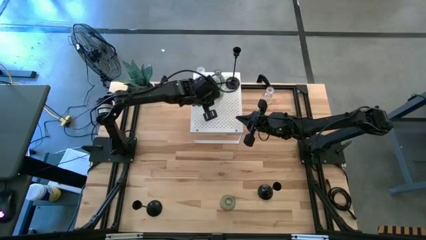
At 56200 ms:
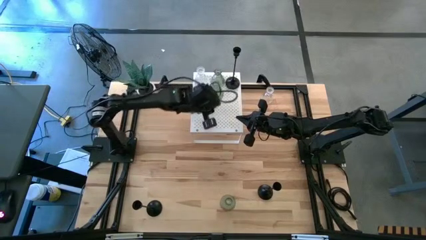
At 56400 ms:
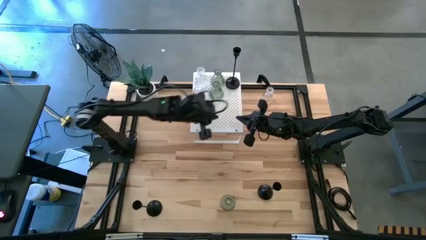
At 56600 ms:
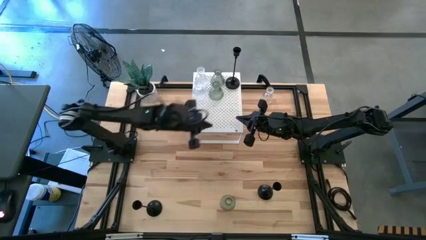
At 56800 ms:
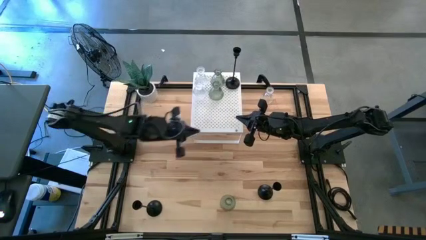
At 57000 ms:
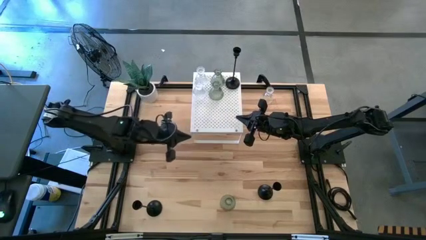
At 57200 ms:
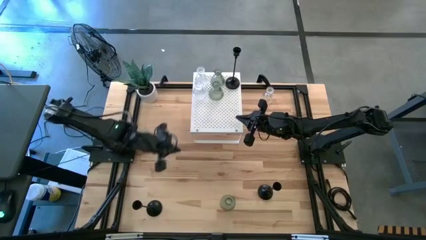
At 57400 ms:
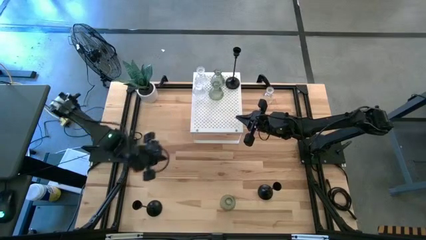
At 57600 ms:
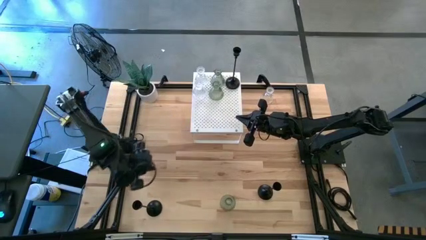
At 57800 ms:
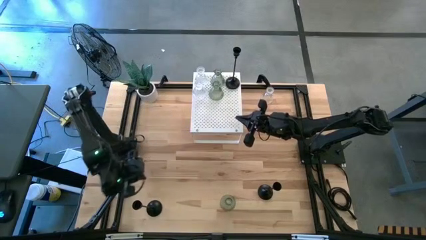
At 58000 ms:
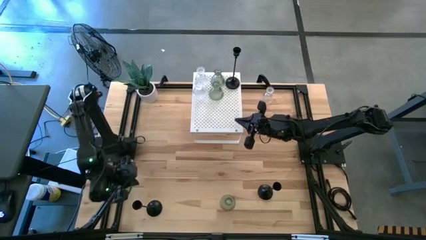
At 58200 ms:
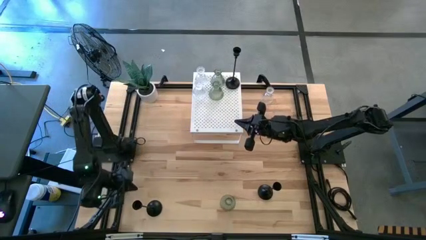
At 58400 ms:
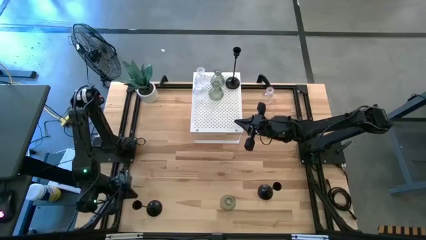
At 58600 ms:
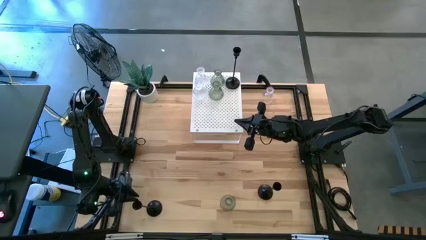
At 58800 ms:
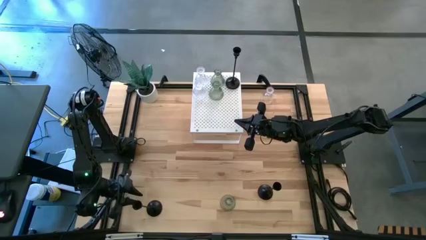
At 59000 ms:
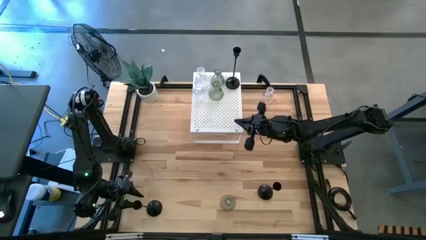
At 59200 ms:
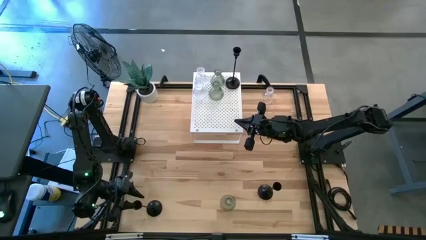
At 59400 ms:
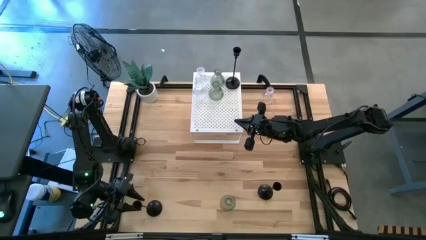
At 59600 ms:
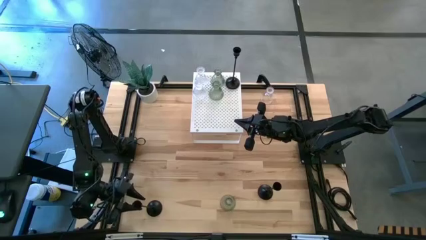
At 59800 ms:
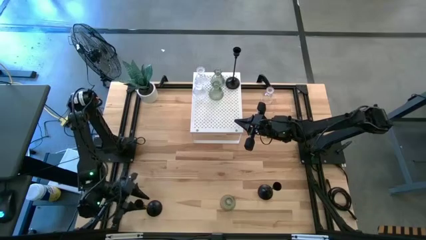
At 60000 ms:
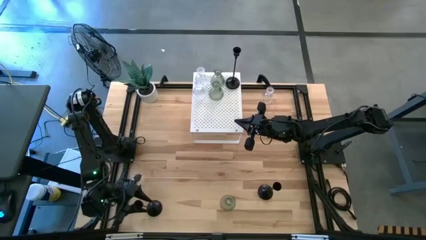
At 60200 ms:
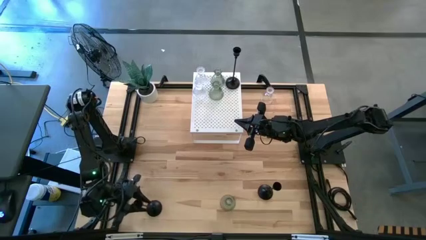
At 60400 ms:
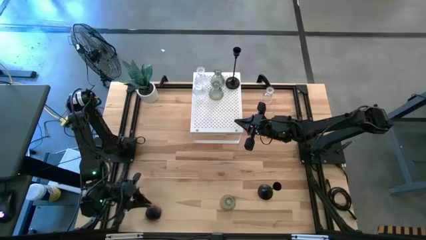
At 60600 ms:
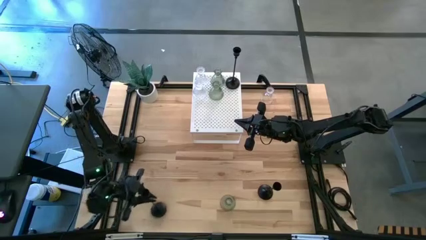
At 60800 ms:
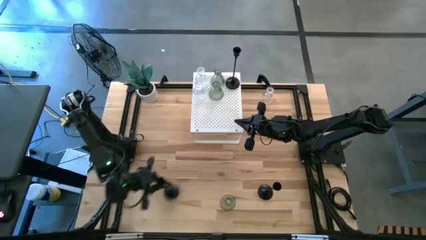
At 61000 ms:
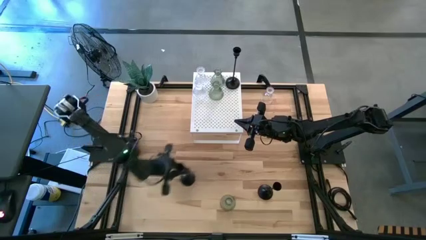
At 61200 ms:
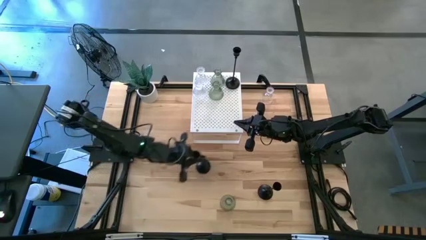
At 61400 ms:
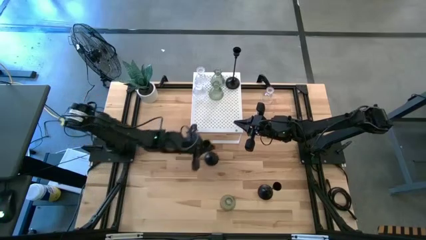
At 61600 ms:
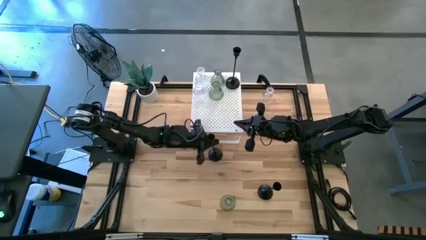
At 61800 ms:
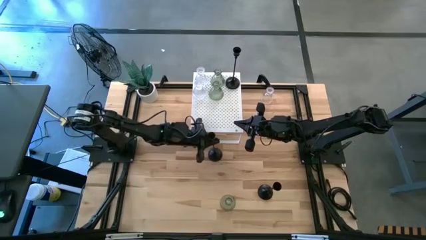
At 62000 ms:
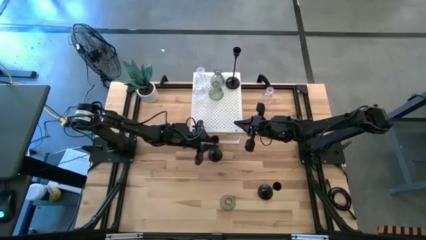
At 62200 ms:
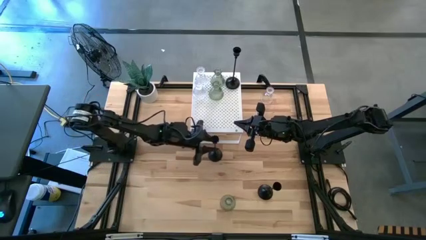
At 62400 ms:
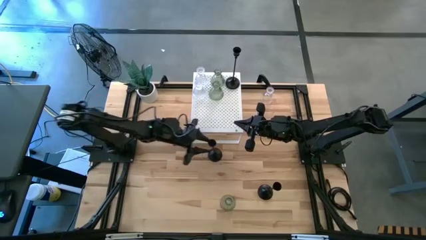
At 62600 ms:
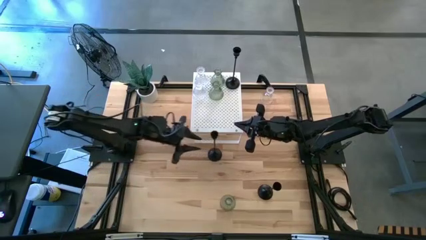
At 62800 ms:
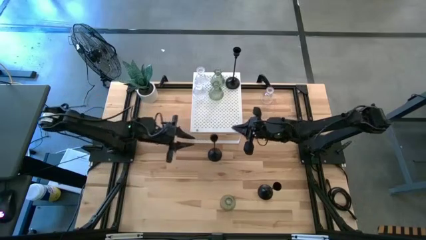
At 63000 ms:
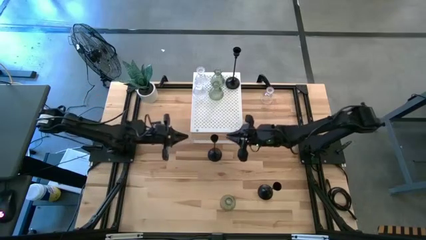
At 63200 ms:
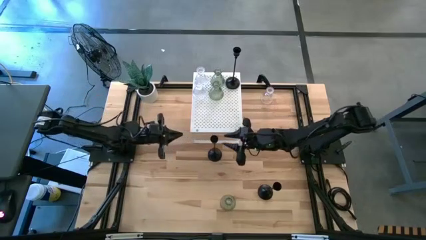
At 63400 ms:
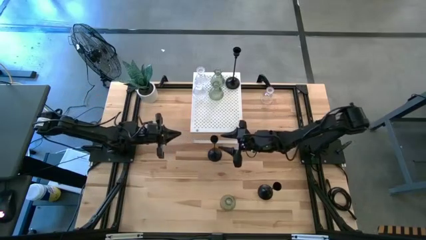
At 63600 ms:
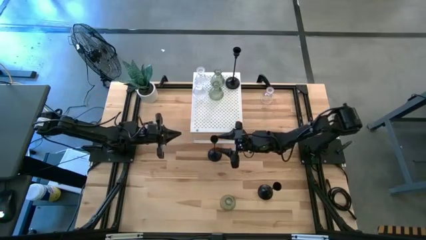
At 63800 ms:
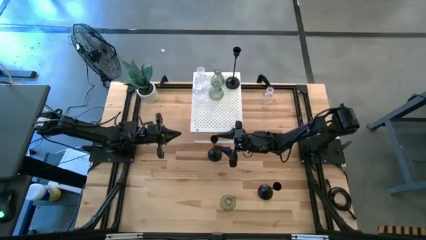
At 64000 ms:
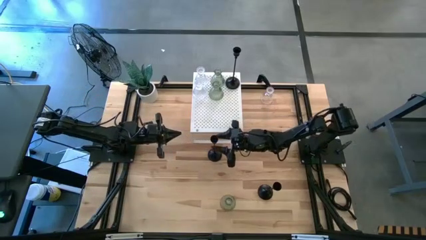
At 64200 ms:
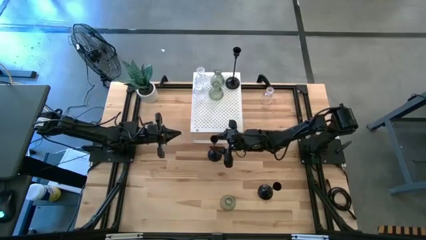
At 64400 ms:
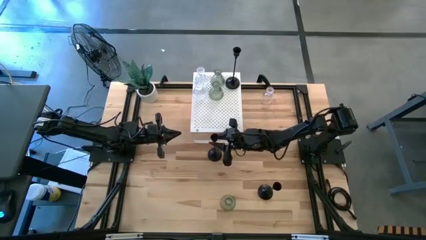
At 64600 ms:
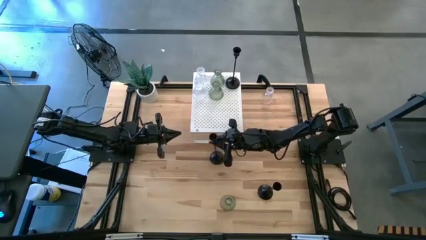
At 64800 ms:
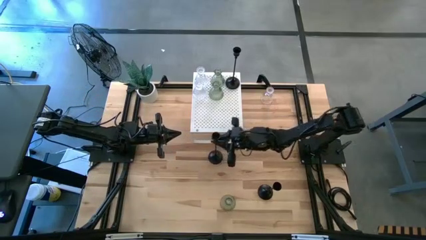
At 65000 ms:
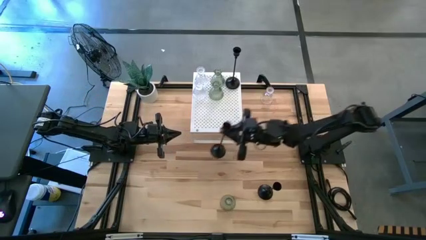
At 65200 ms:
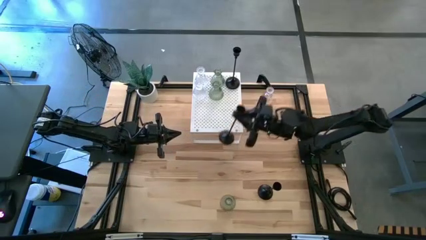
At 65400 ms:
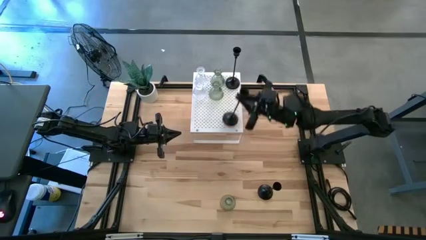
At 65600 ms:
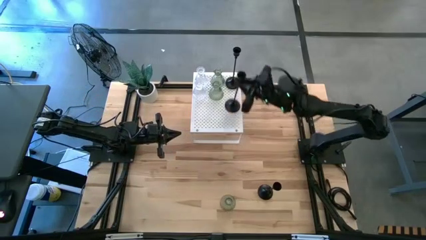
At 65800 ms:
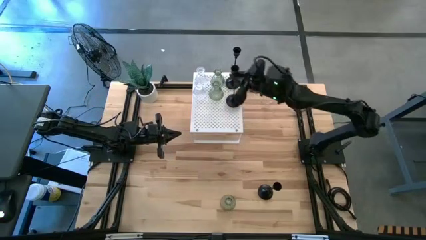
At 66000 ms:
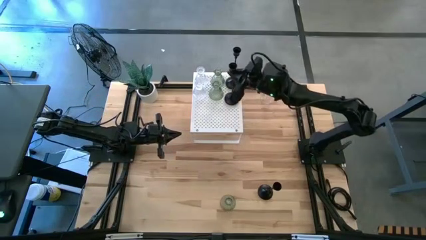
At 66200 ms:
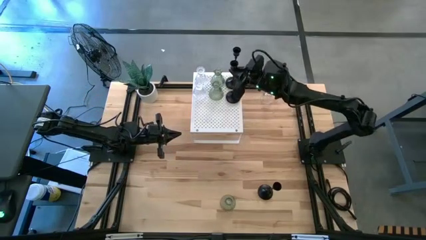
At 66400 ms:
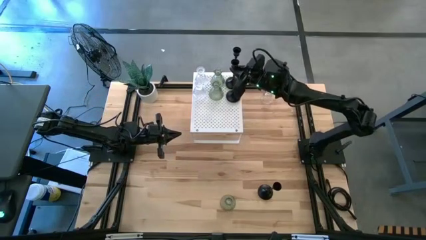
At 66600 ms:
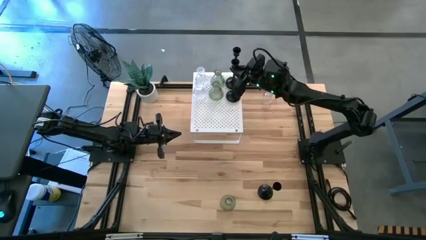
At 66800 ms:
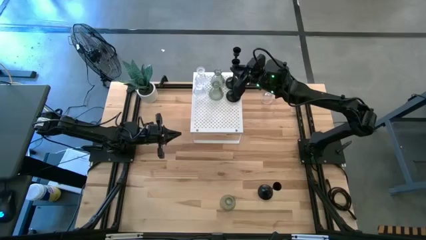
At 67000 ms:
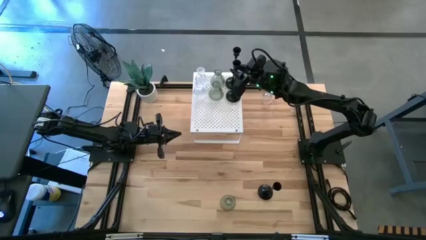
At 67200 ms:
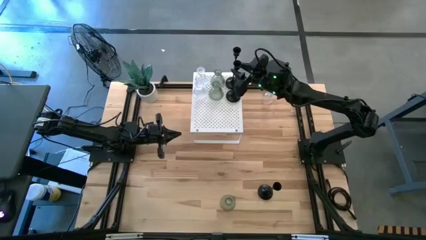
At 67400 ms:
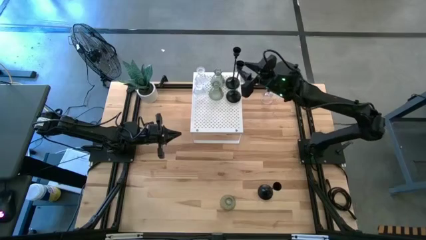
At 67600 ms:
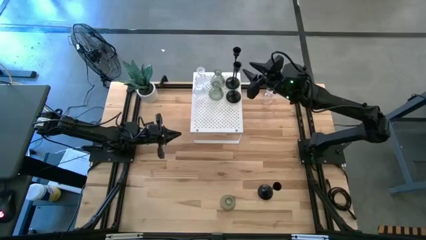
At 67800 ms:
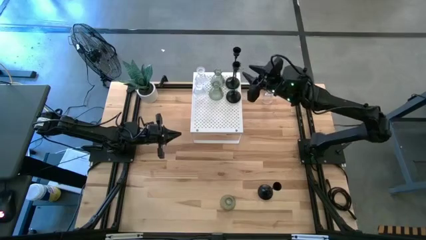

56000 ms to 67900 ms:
Task: Pick & Place candle stick holders
Put the left black candle holder on the shelf aligned with the black candle holder

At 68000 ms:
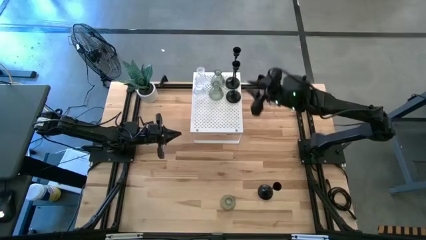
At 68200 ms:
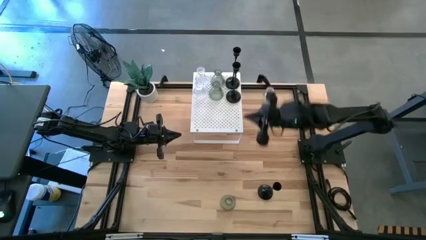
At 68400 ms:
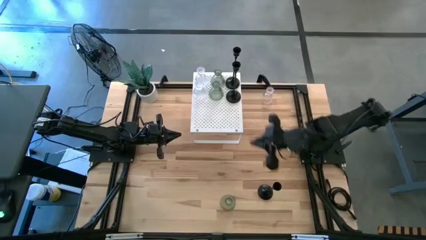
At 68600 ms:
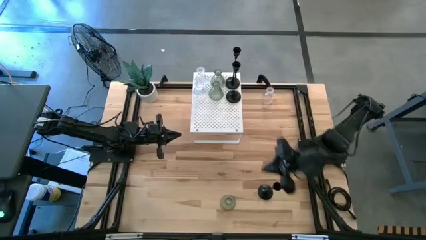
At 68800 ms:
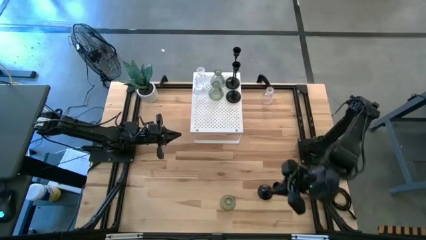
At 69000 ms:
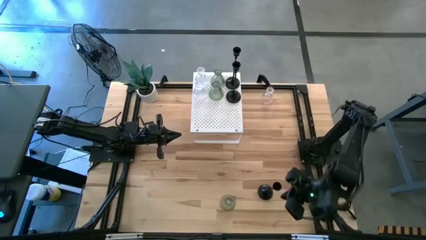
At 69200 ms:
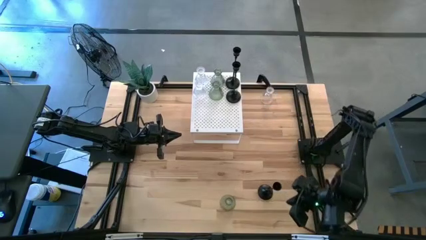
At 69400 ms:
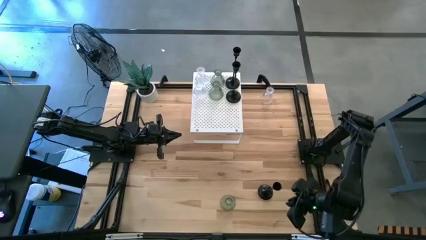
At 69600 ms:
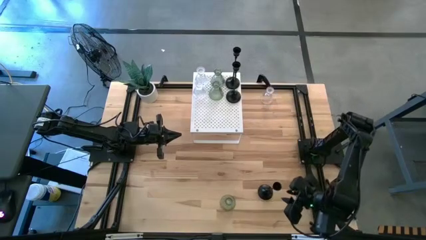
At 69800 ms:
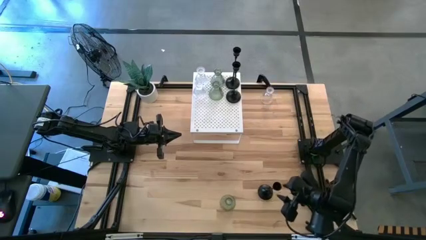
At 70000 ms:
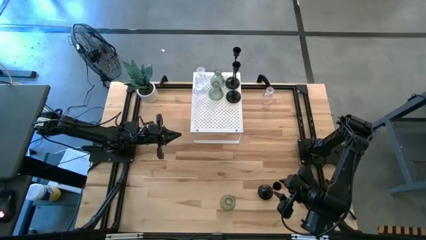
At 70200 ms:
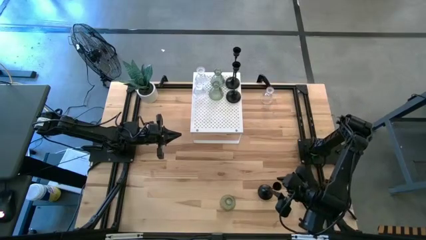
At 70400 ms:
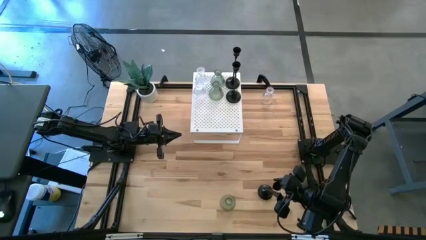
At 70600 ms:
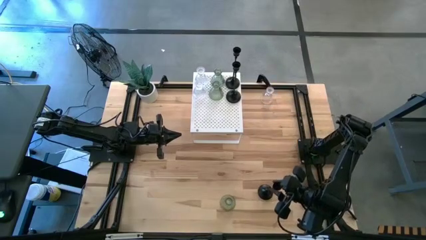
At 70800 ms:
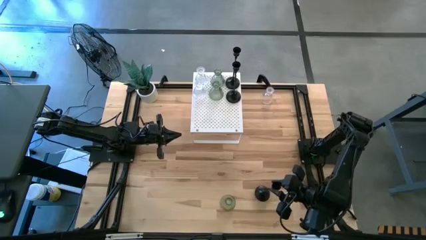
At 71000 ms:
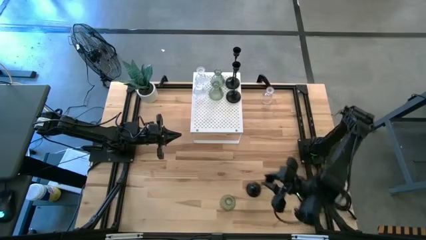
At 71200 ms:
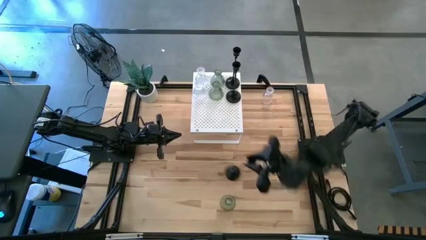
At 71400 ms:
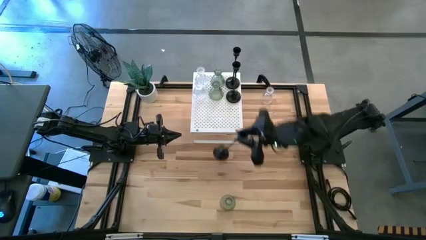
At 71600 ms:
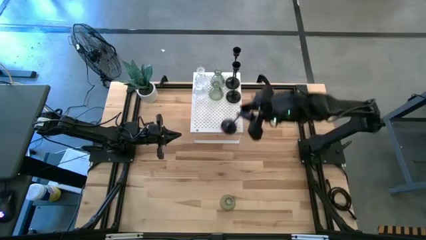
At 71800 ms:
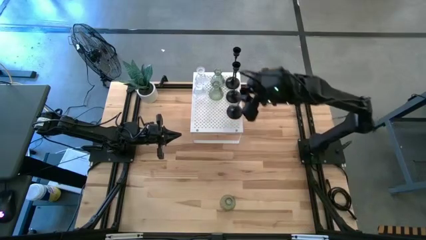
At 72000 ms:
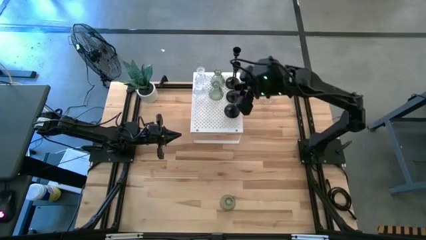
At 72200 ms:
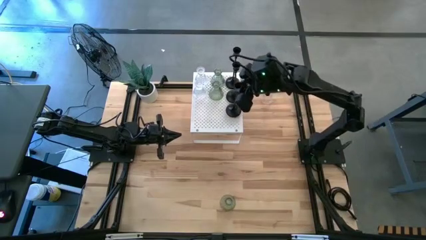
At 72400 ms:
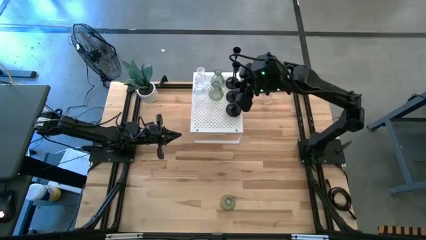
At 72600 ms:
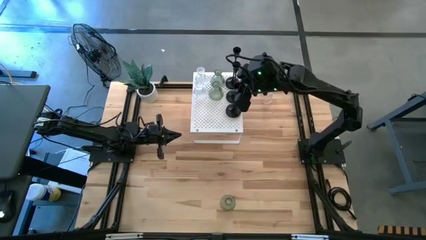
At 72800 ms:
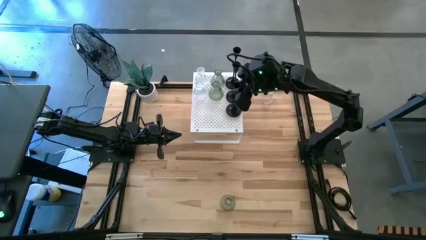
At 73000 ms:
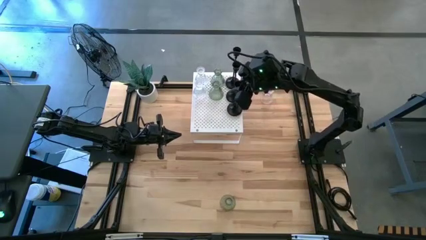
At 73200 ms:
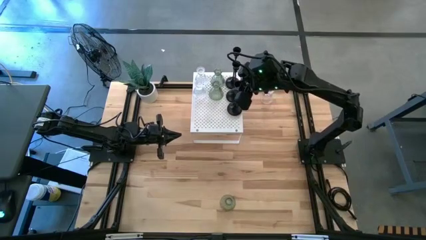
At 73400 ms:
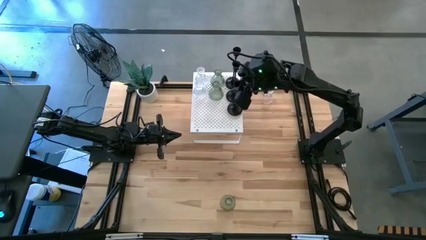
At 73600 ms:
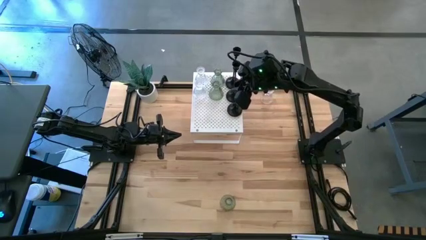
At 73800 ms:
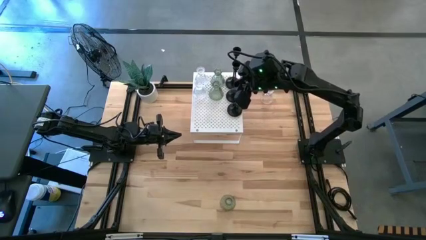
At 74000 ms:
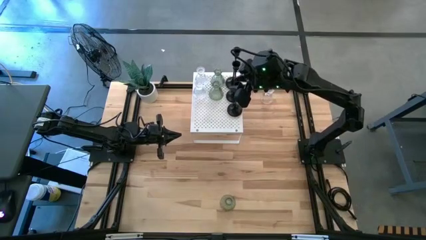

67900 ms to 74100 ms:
Put the black candle holder on the shelf aligned with the black candle holders
